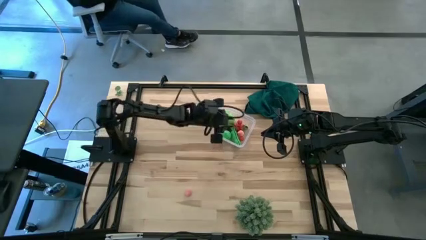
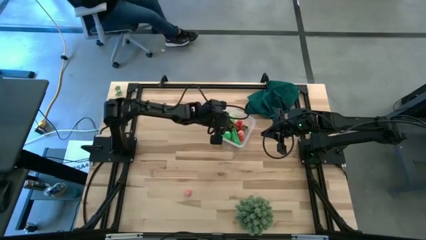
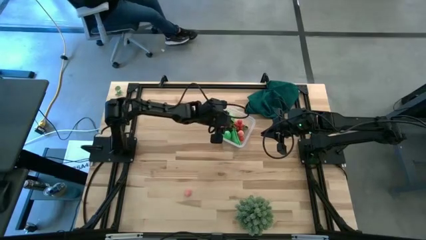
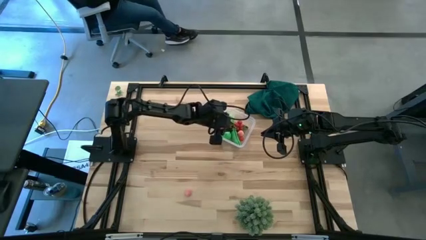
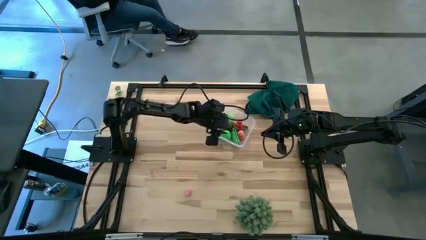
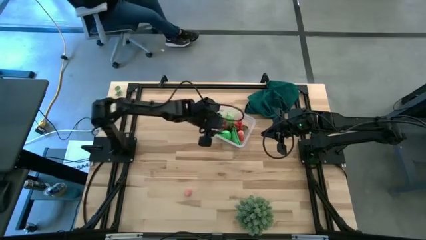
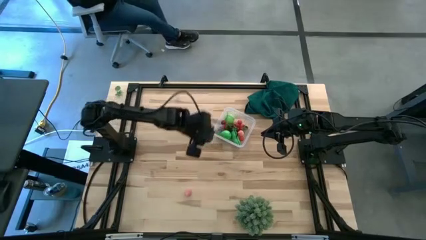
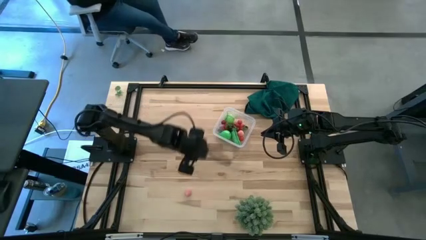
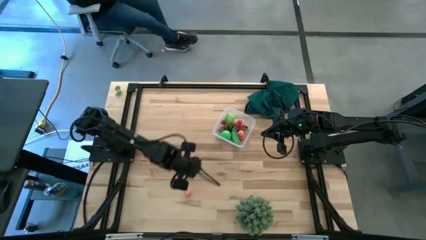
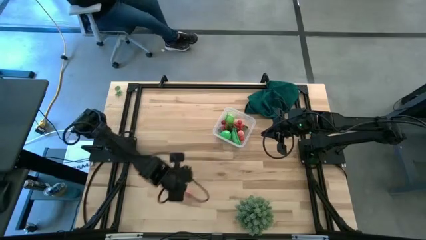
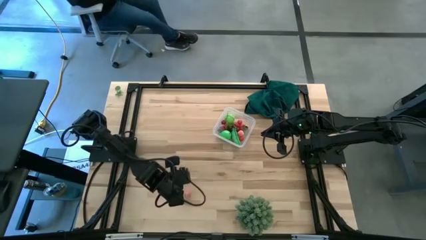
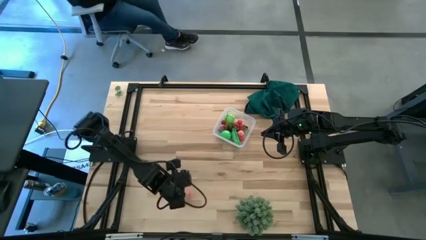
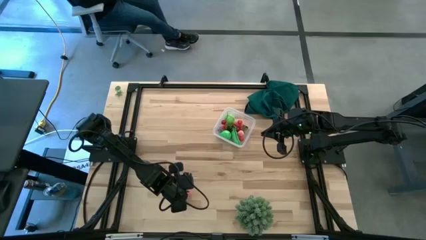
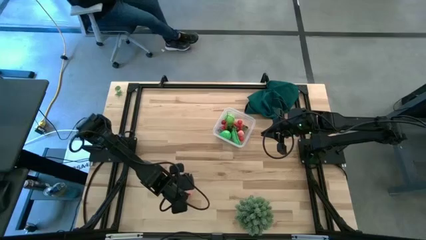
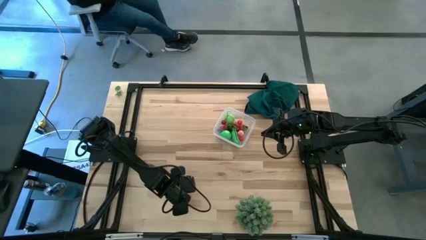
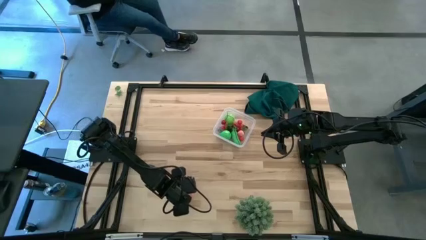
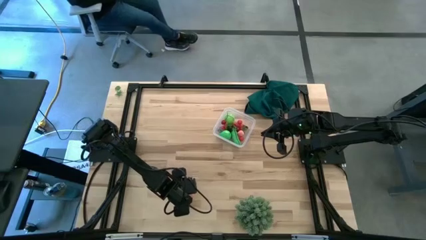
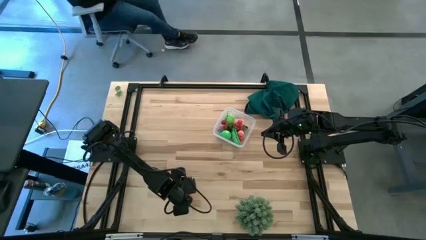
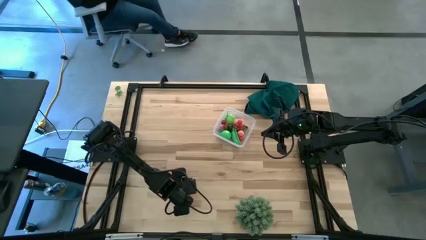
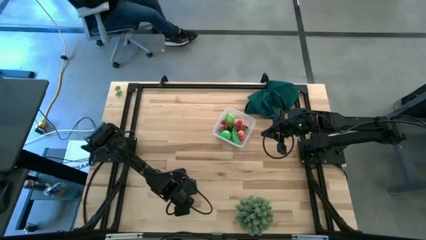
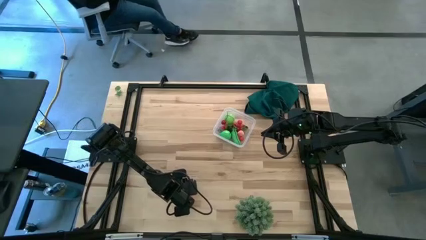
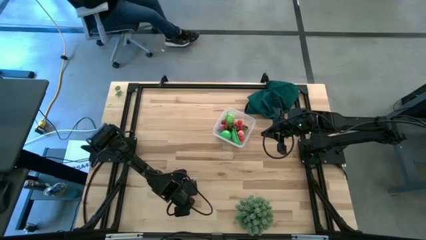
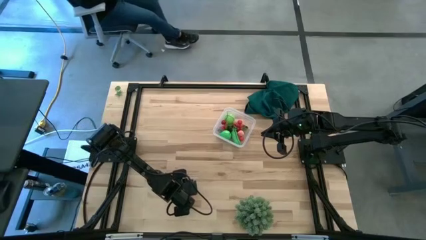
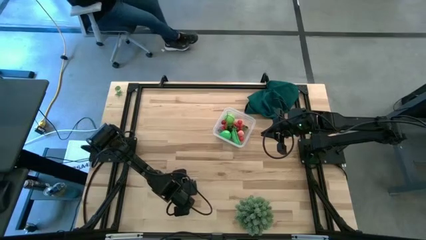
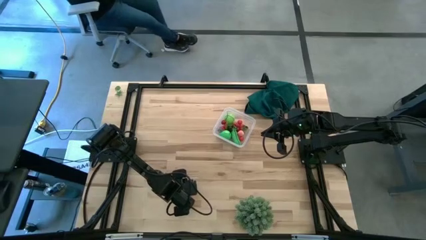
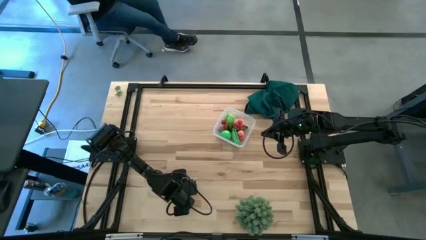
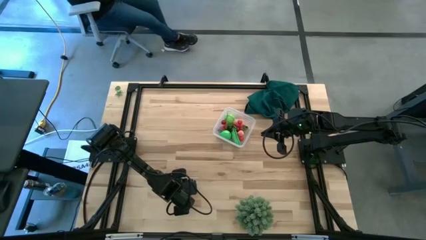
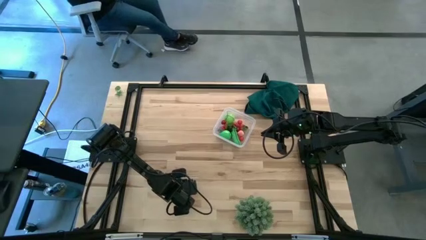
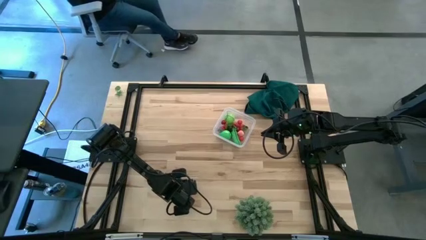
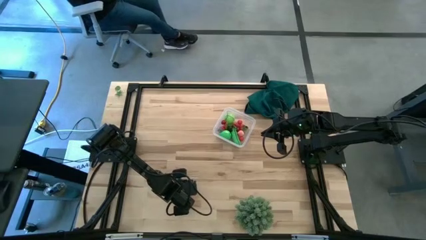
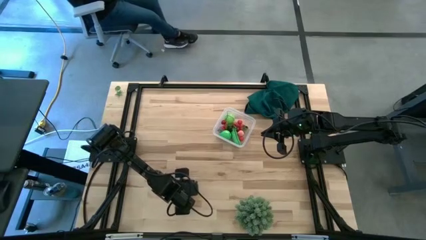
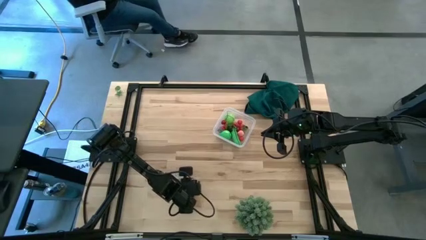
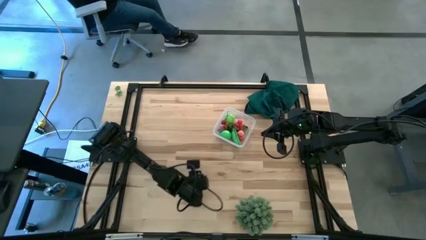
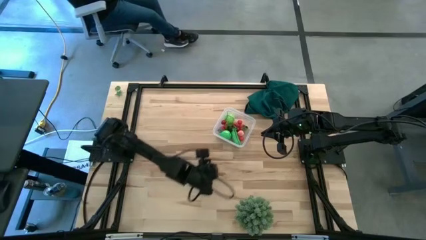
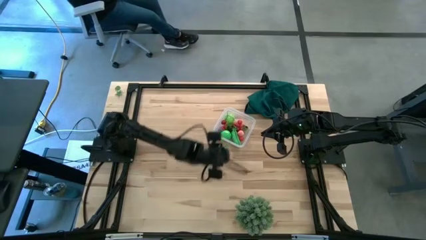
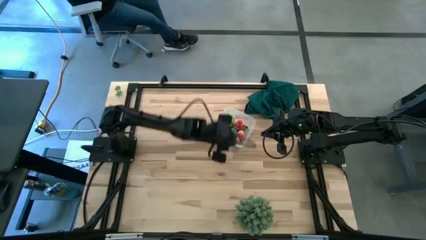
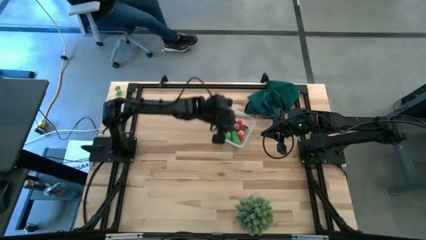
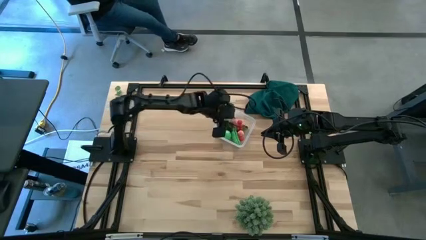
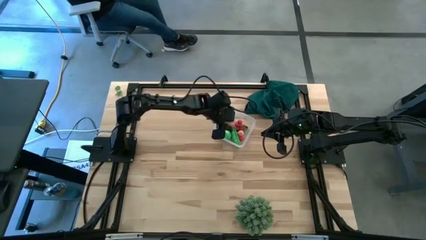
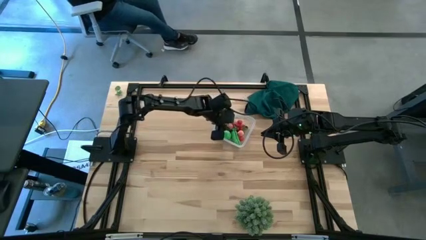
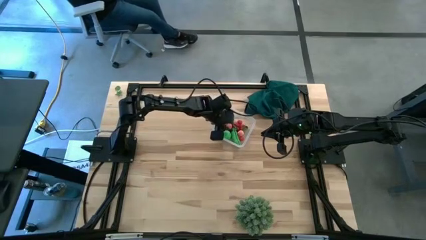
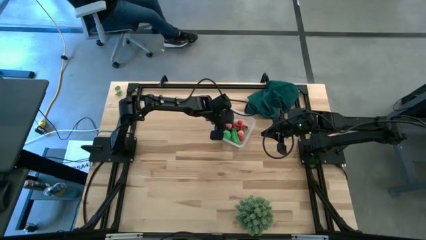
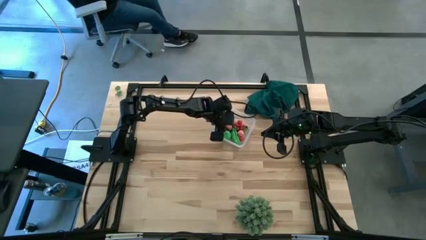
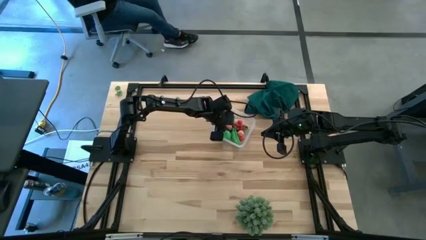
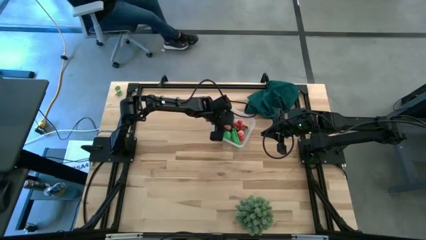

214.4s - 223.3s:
Task: Pick and placing Produce into tupperware
Put the pink peach into the transparent bin

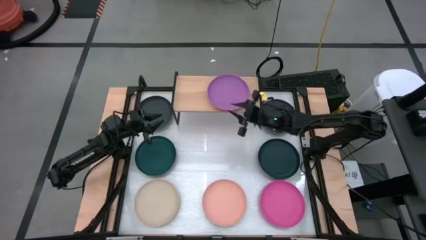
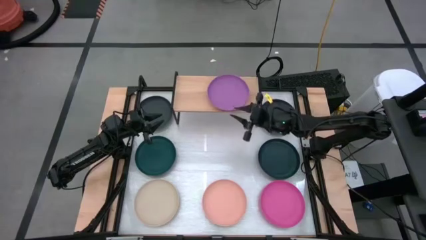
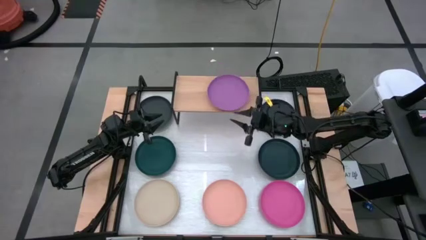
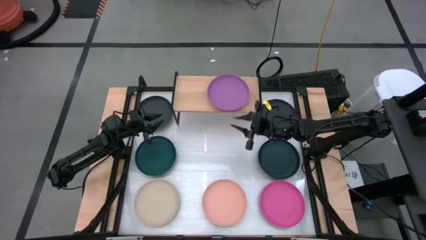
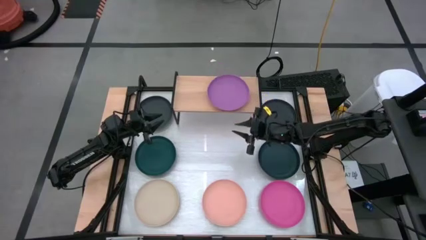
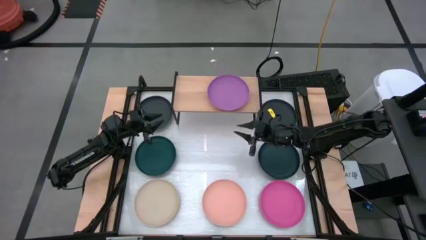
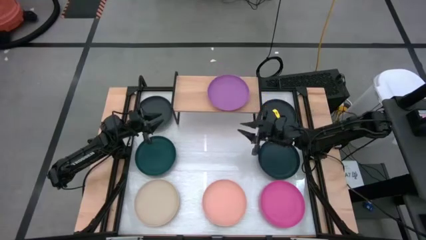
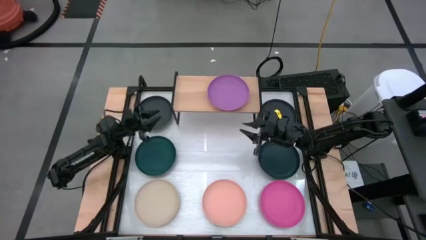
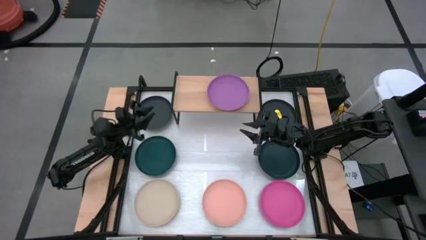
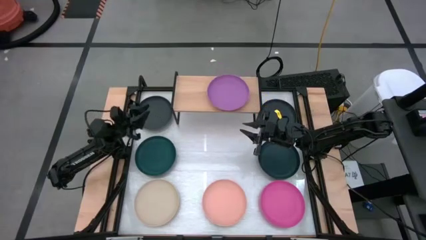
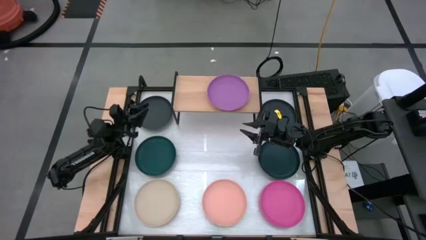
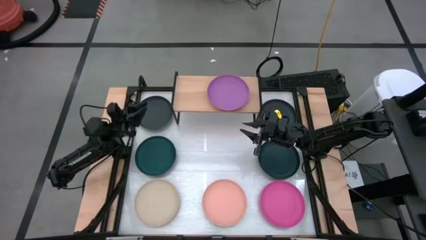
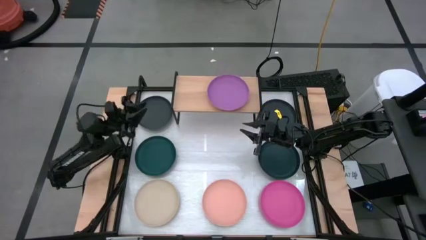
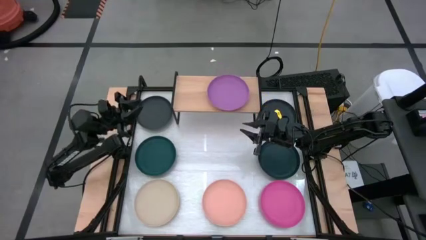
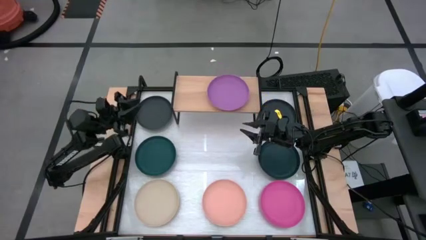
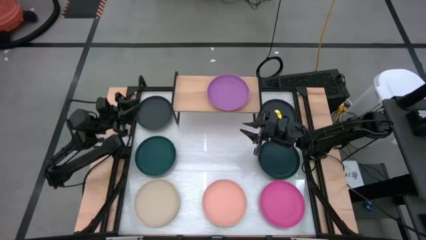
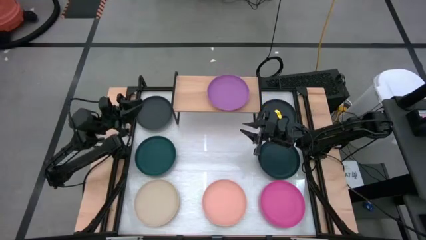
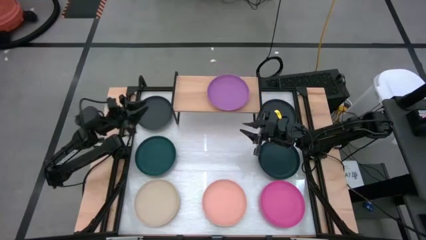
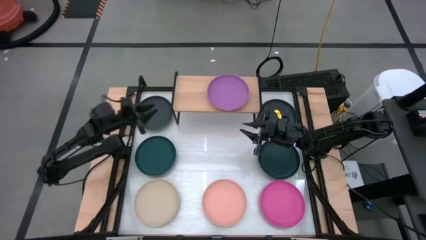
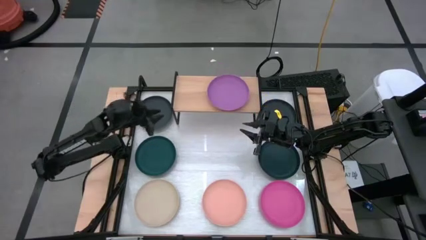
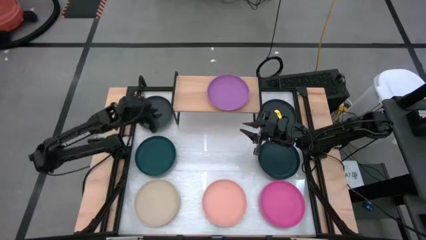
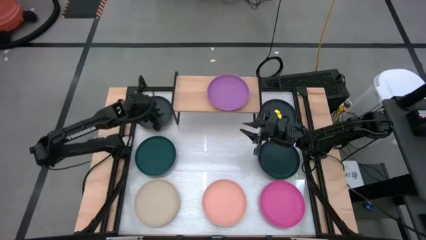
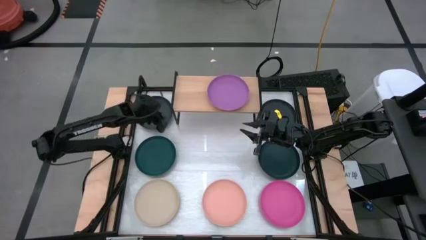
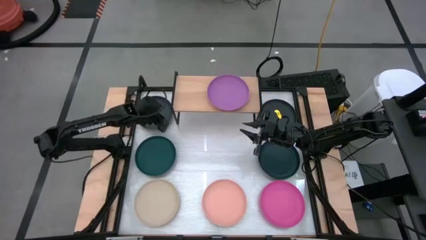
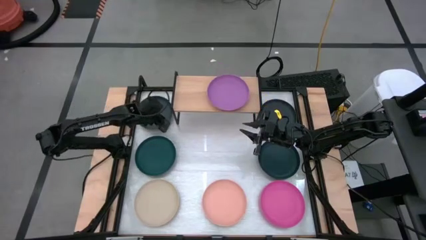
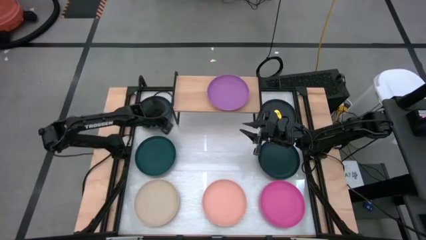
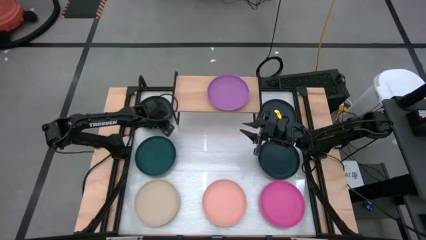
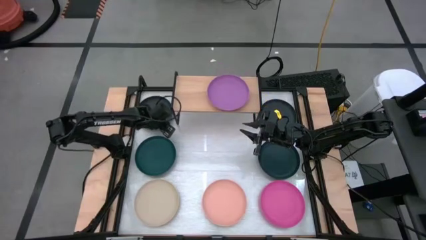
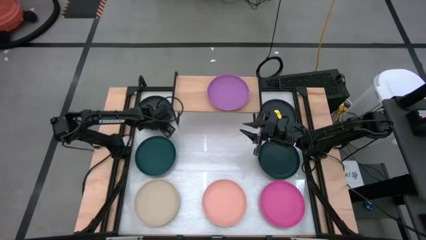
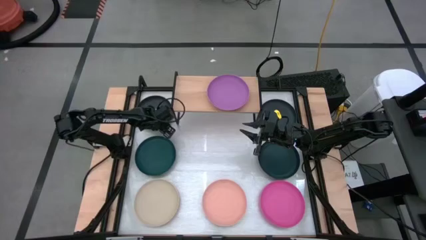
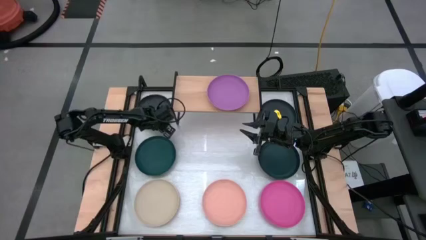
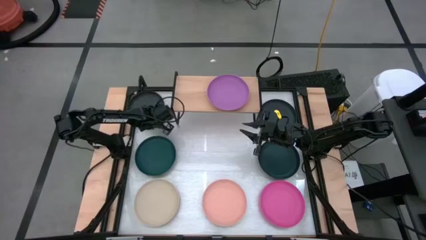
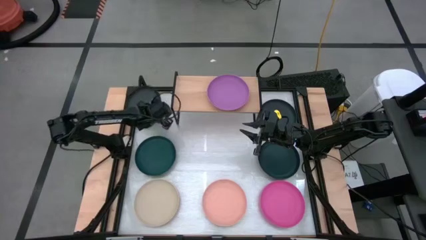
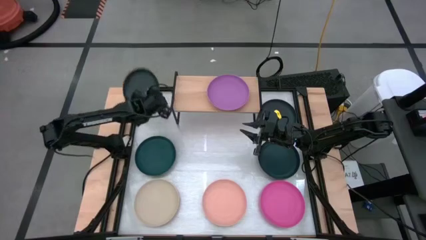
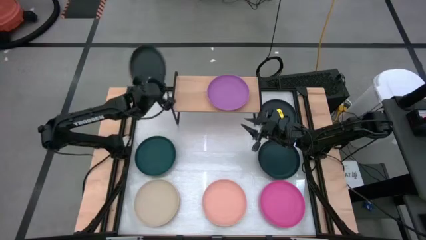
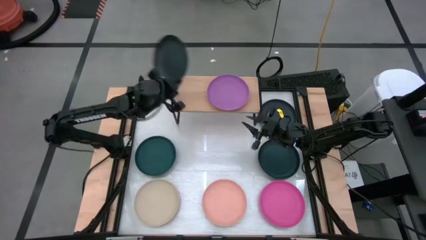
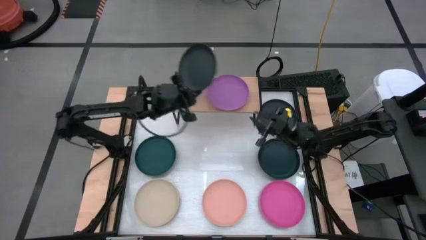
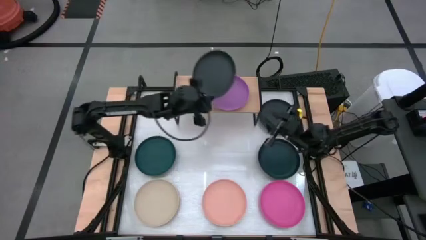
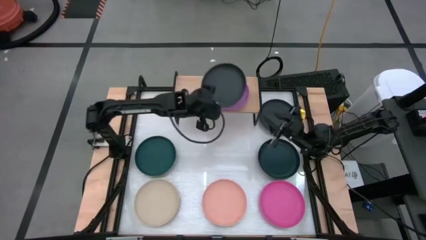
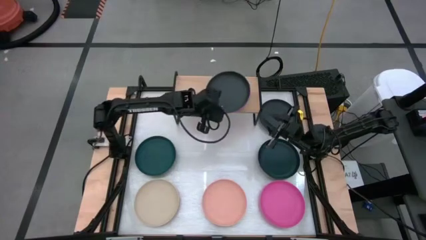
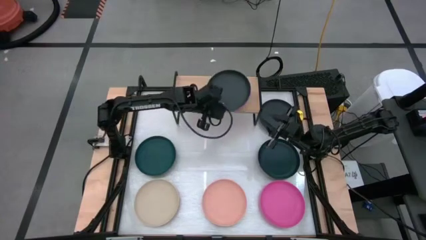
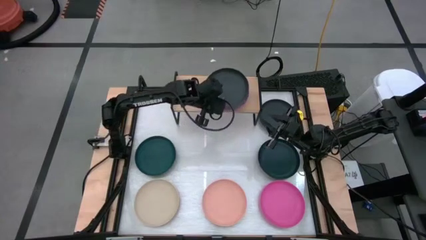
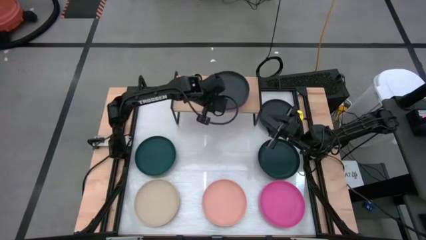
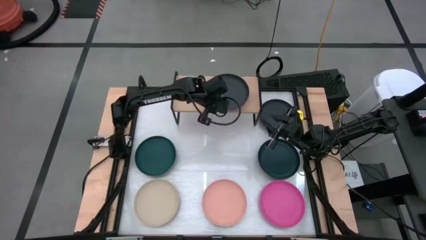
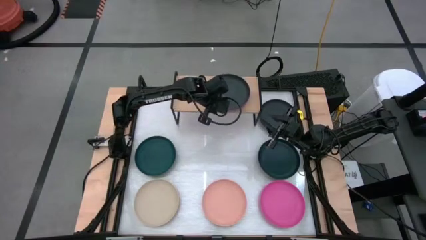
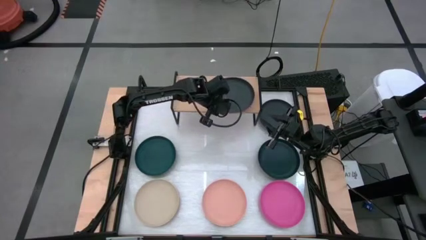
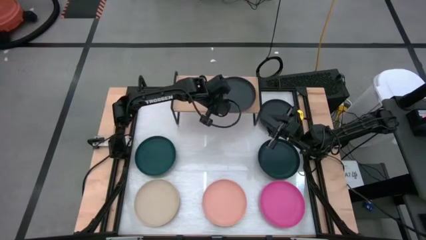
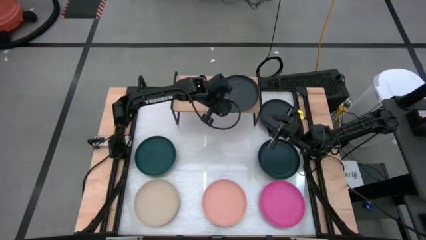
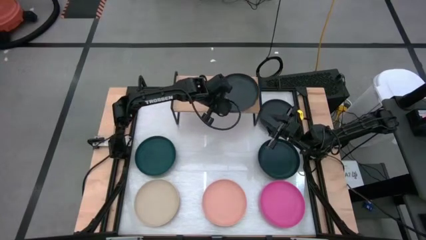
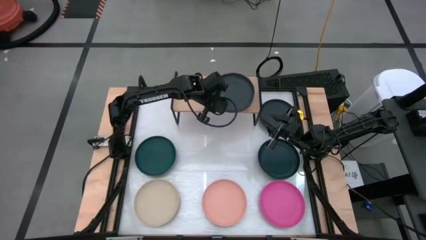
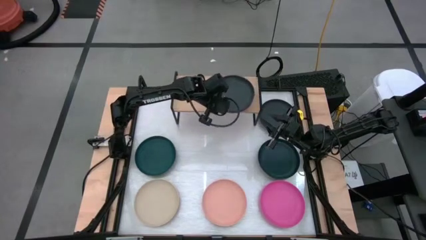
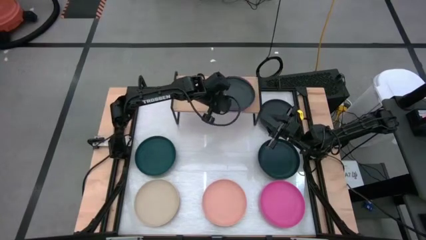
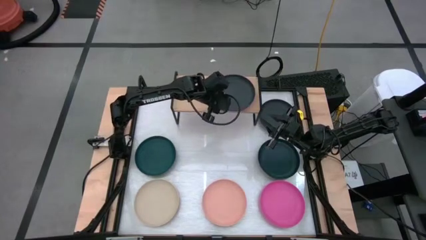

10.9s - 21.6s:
Task: Place and stack plates onto a shelf
Stack the left black plate on top of the violet plate on the shelf
